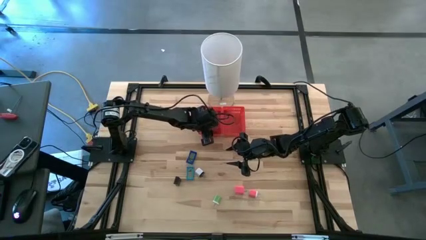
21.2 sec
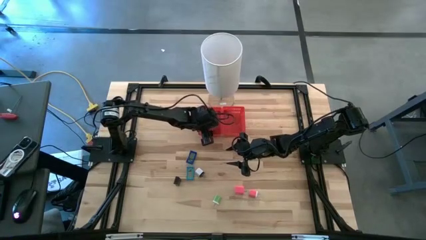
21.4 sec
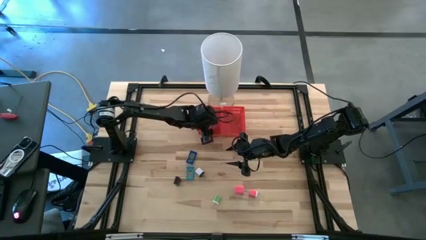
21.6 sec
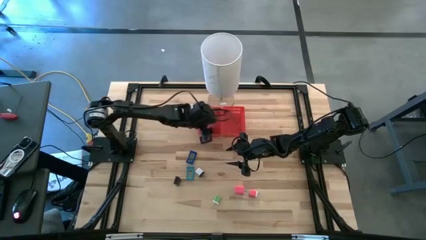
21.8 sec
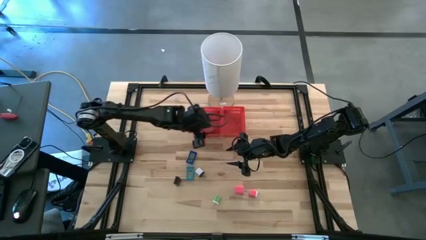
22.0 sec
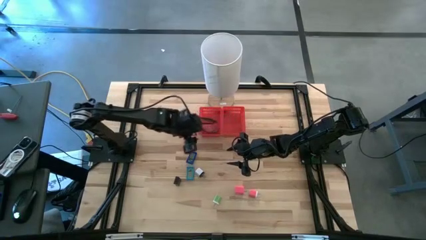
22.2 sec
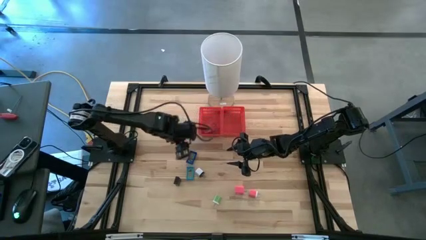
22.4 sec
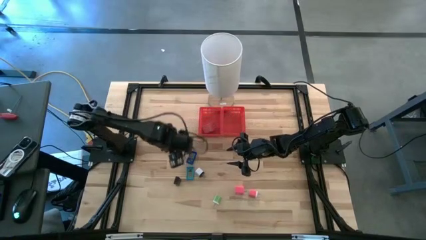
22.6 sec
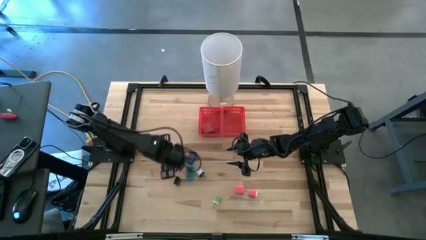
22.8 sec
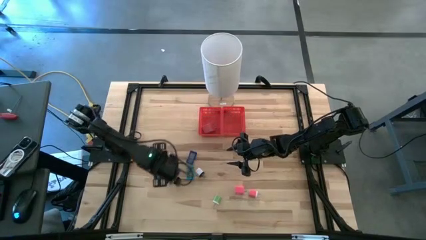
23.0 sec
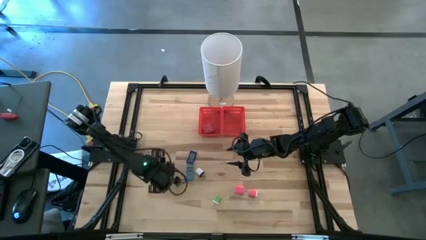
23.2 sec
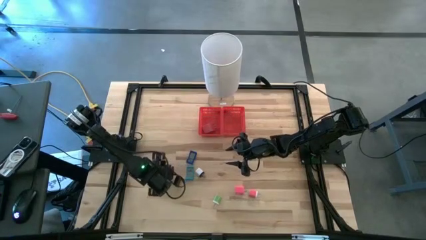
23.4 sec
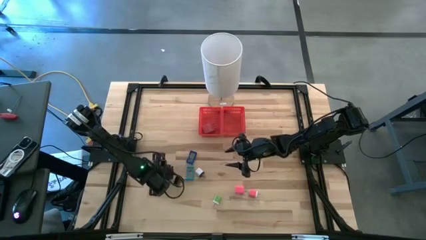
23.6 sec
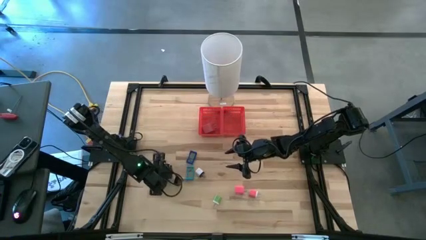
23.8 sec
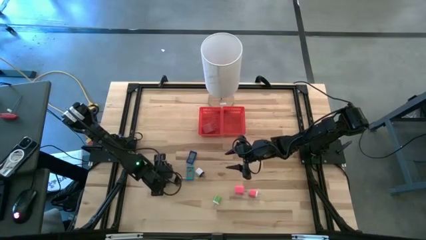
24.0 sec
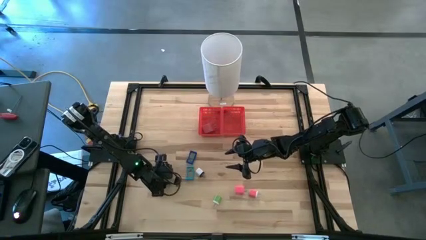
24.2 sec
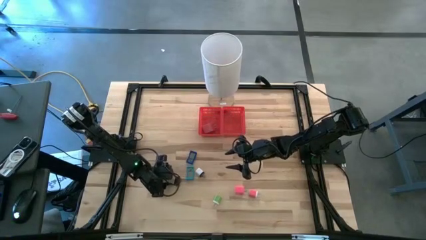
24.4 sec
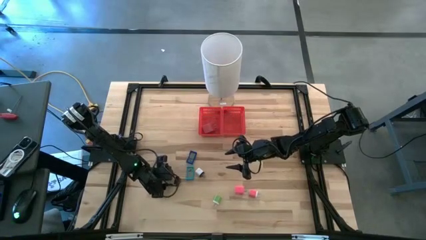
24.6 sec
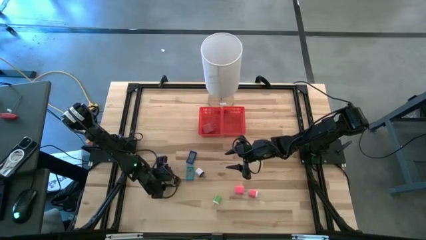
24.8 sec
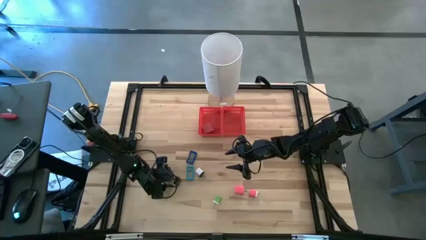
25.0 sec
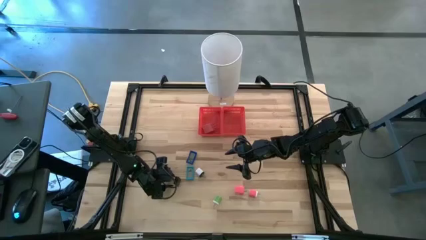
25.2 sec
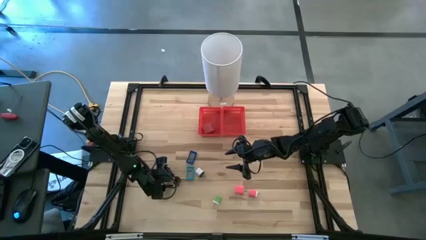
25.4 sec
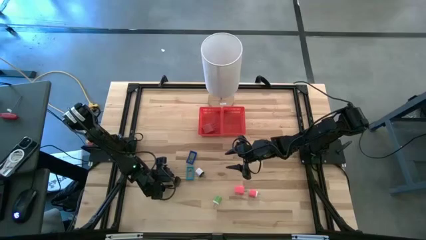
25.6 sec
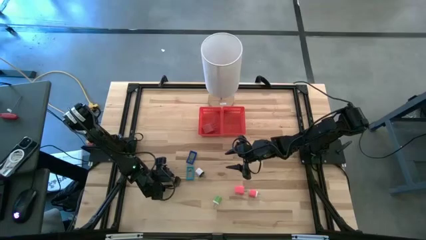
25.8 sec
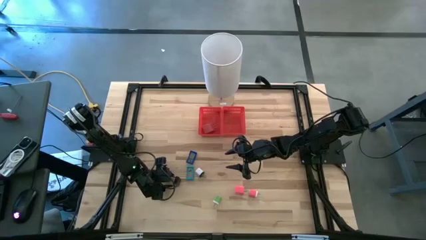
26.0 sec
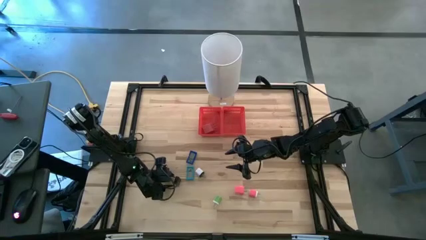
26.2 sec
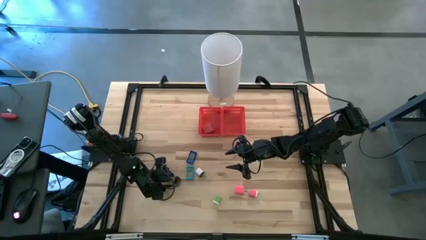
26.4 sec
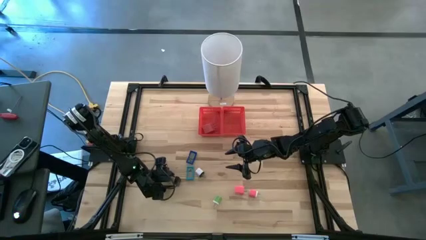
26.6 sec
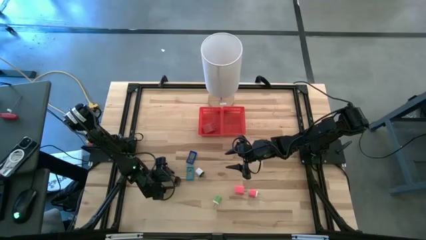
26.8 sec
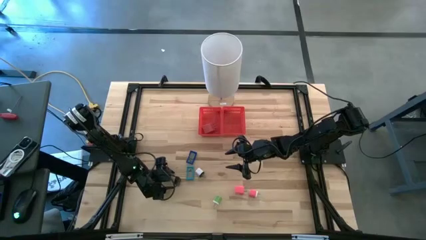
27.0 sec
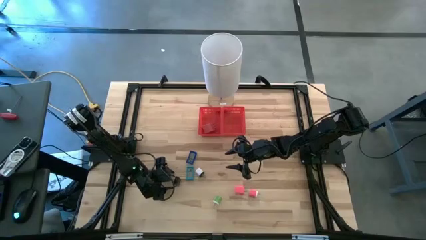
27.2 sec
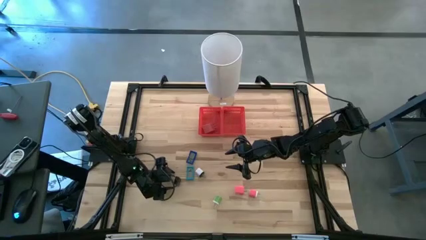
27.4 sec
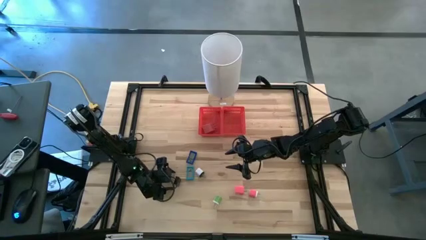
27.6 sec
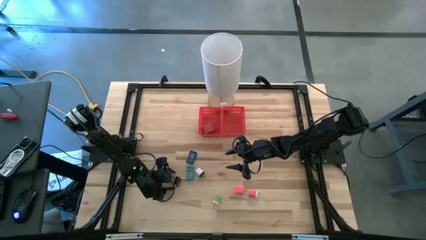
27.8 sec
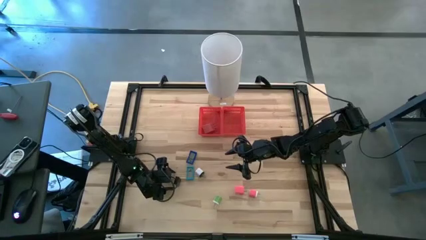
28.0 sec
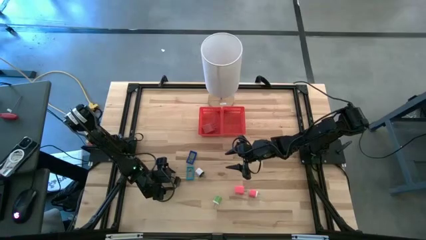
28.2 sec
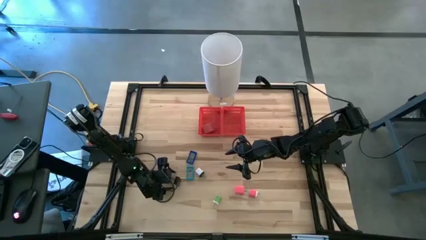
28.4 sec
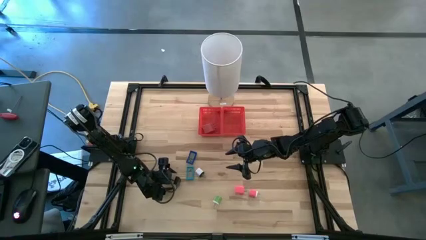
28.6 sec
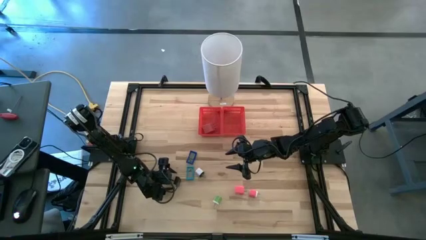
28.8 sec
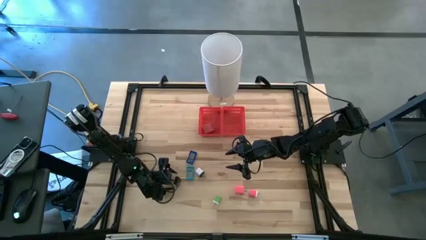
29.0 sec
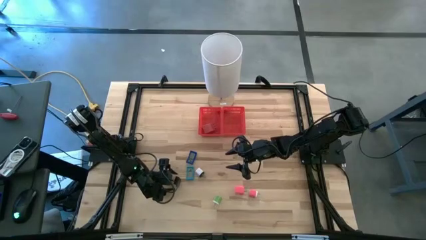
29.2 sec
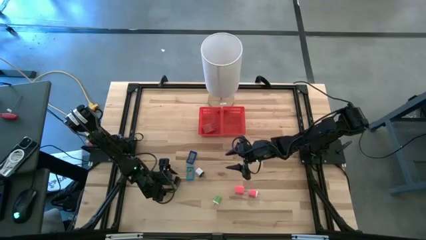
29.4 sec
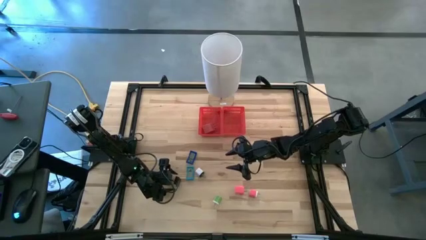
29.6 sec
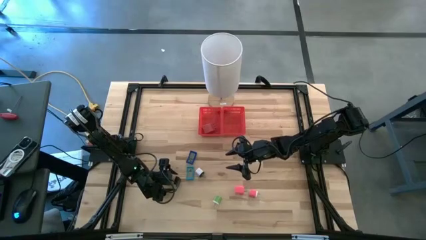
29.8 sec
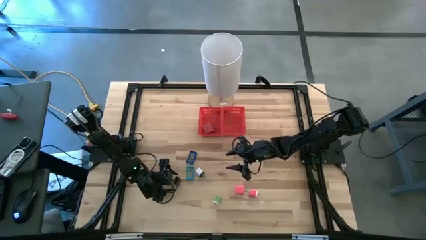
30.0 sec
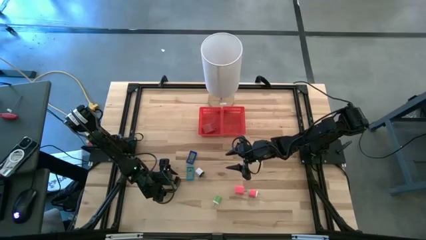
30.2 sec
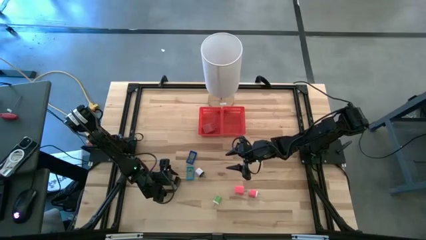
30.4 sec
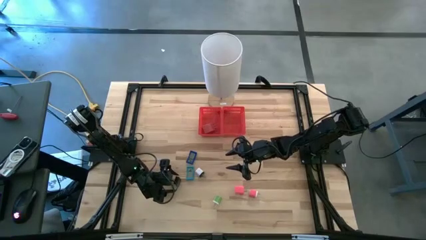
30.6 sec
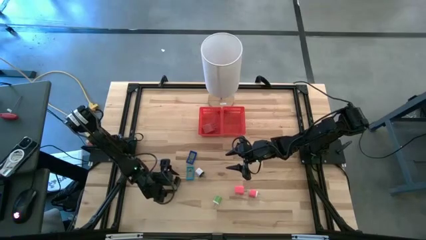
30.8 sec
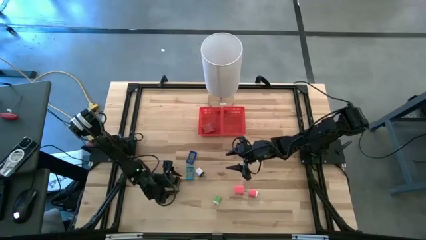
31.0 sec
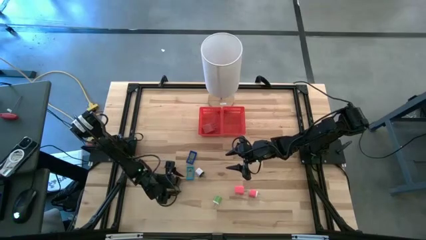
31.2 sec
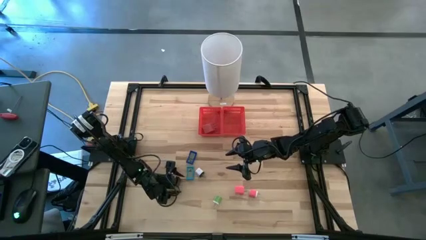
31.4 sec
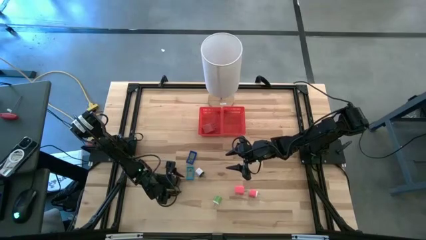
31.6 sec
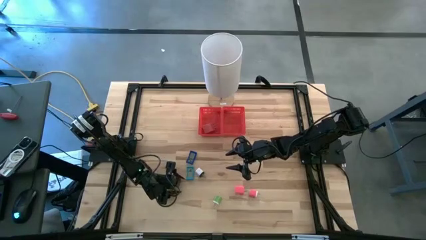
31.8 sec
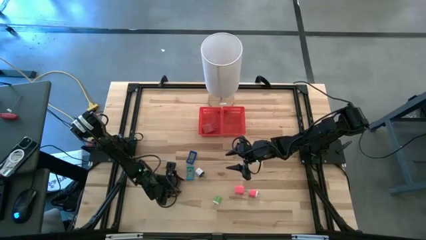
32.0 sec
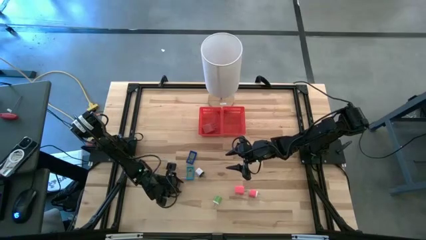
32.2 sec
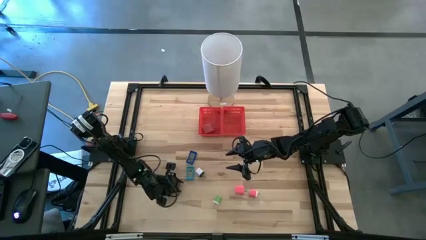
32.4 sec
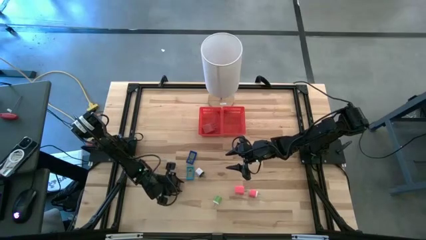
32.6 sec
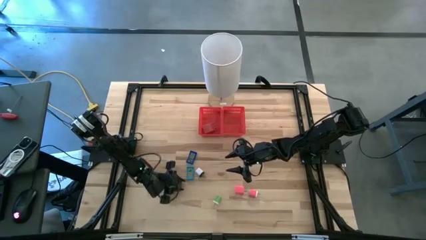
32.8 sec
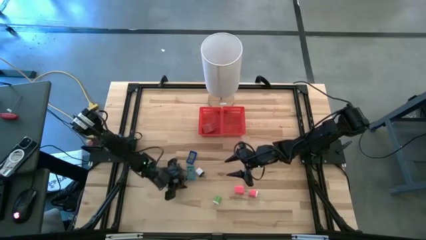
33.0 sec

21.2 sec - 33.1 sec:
Task: Pick & Place Office items
Put the black digital clock into the right red bin

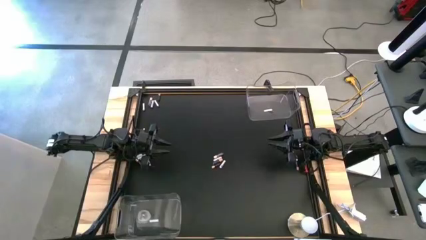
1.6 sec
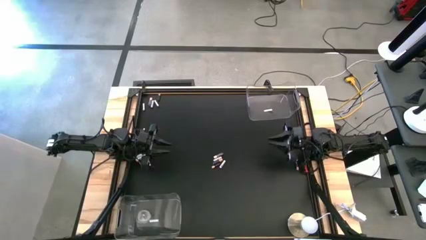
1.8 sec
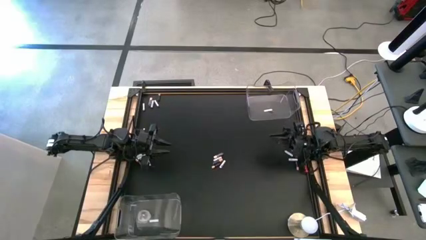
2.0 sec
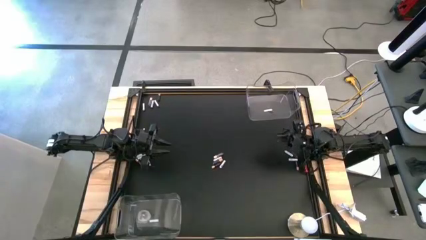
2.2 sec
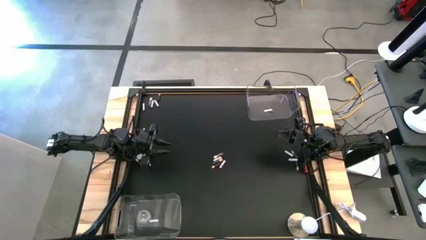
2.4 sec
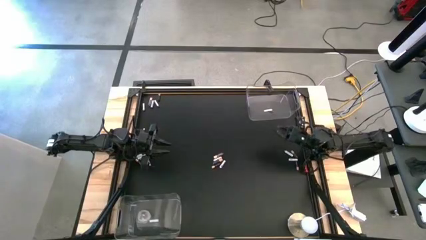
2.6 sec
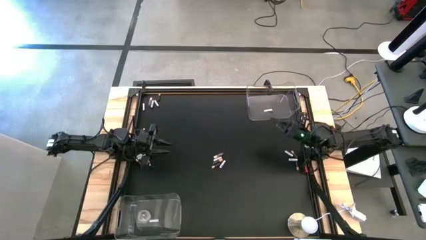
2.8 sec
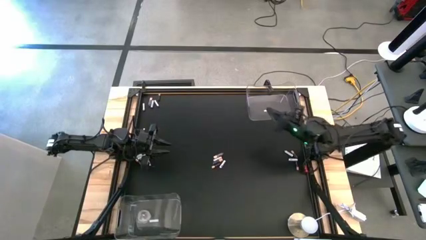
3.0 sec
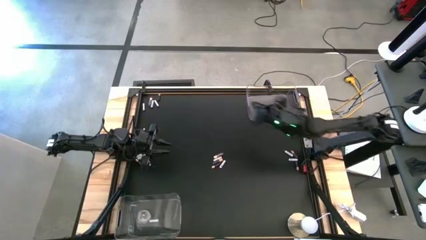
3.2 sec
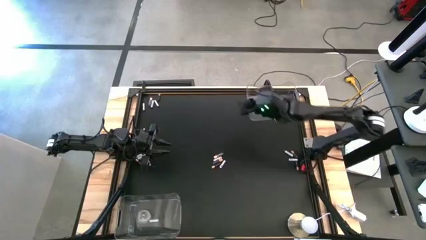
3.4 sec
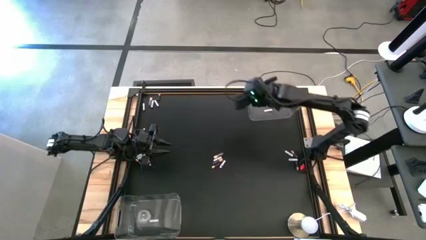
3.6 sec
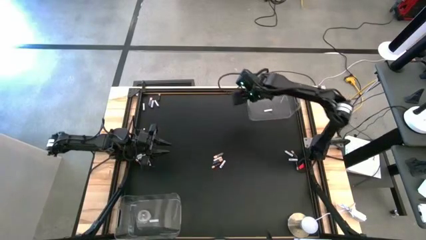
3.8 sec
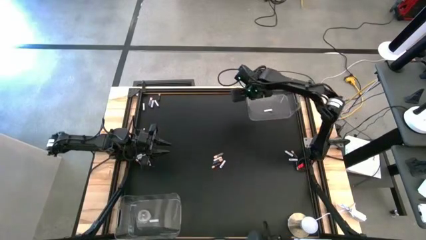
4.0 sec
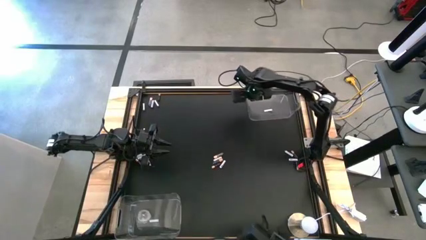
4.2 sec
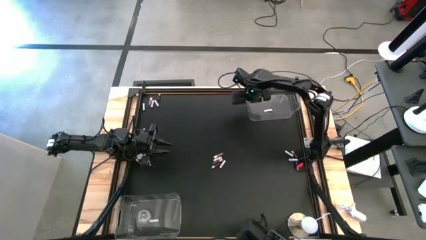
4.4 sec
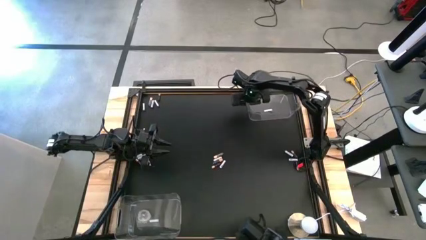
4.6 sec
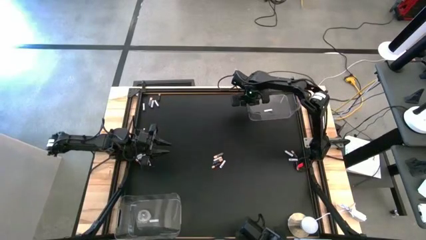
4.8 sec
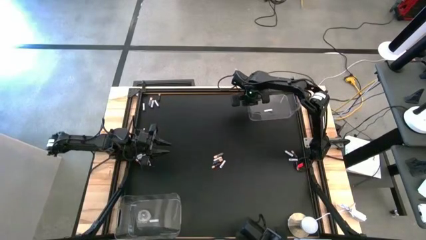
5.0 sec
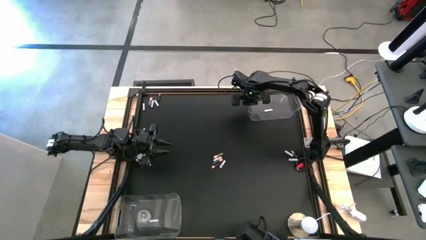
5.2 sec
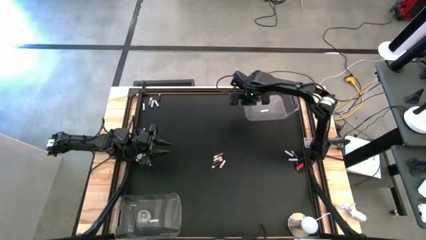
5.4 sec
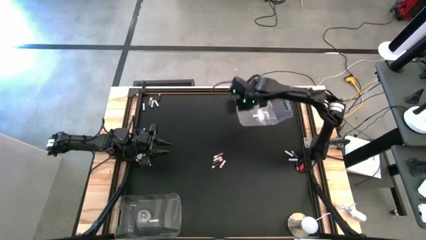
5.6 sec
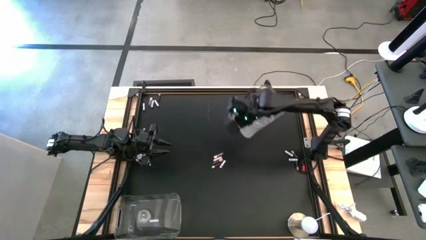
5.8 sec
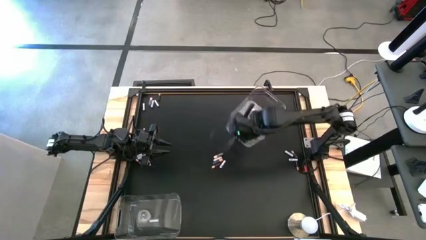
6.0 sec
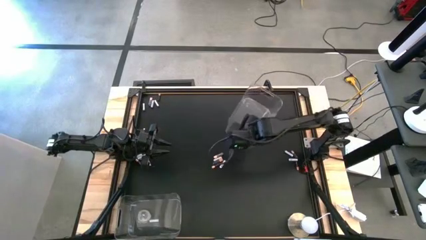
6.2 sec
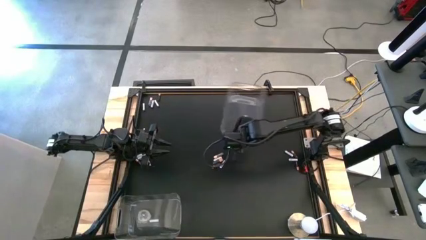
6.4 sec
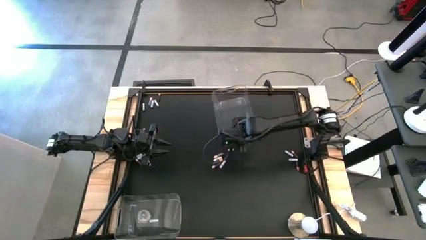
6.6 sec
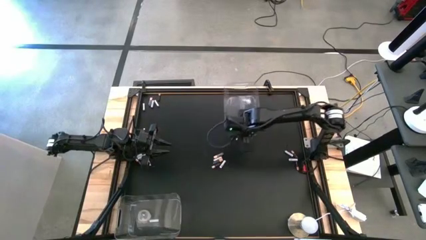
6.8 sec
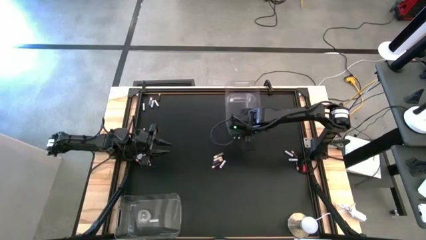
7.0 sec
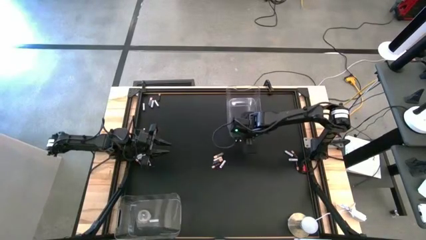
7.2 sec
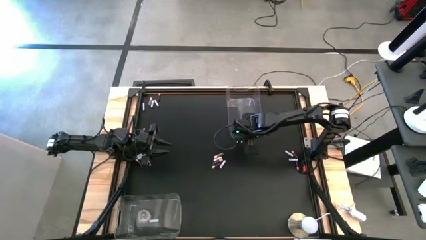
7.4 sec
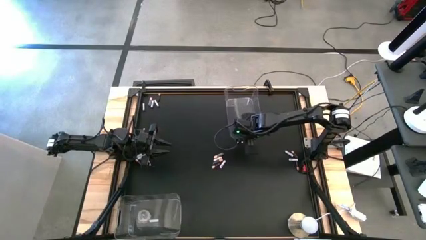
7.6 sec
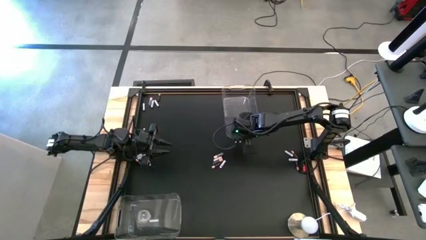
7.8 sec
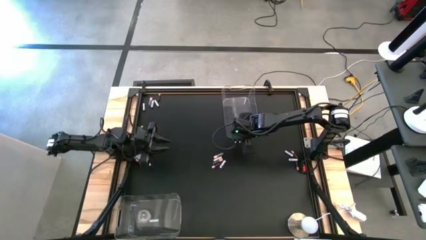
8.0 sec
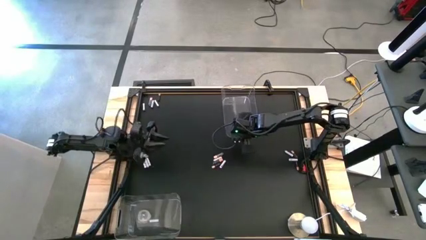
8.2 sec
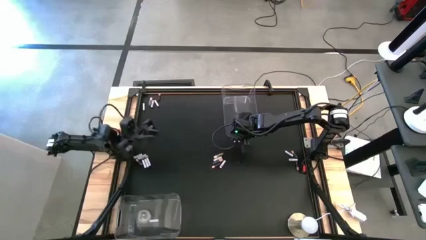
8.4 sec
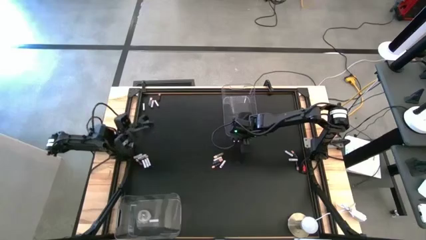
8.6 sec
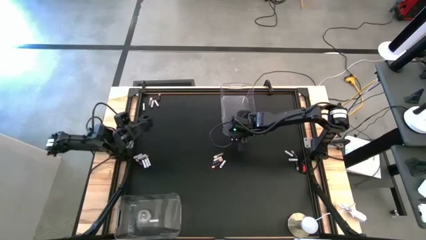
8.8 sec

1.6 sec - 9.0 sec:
Task: Sort batteries
Move the top transparent bin to the top center of the table
